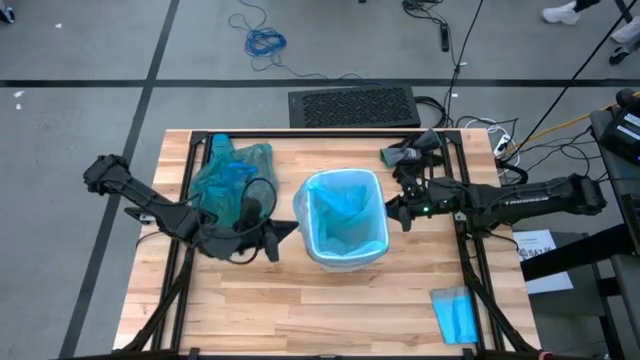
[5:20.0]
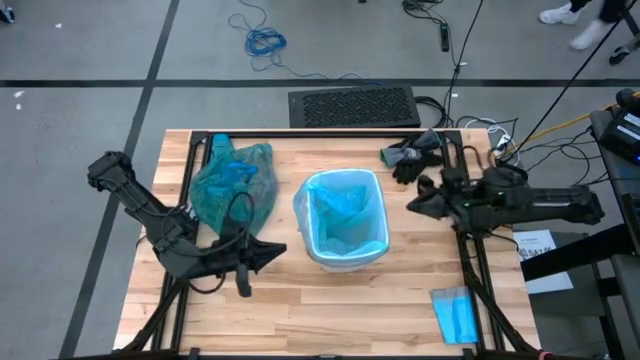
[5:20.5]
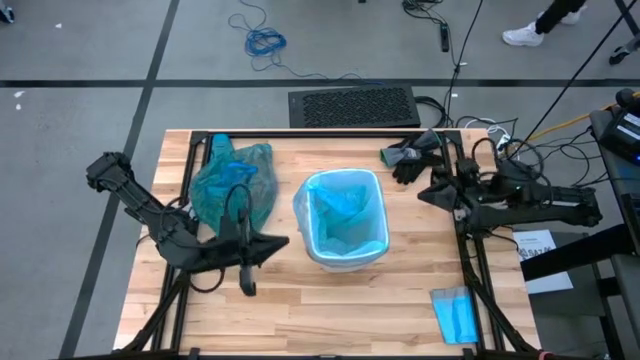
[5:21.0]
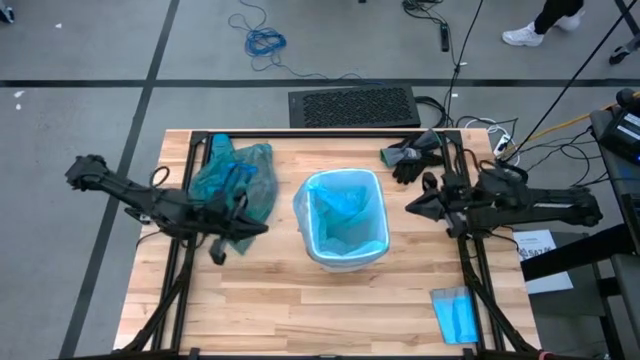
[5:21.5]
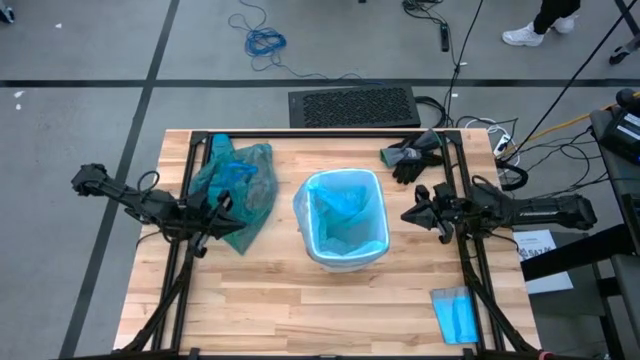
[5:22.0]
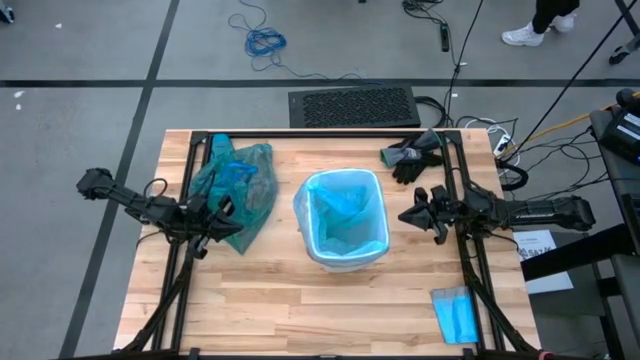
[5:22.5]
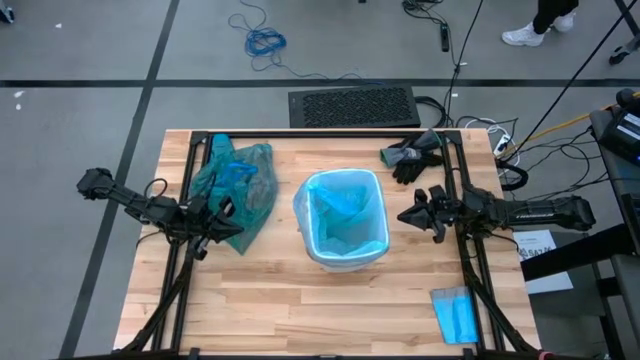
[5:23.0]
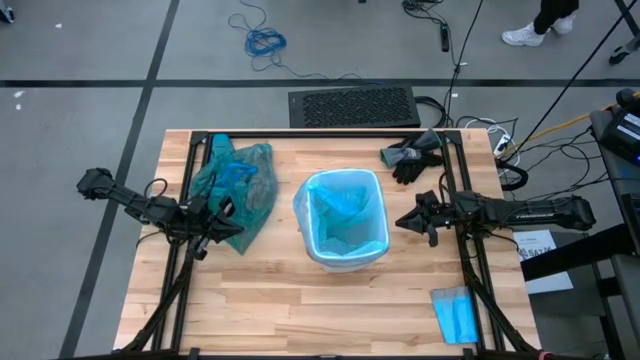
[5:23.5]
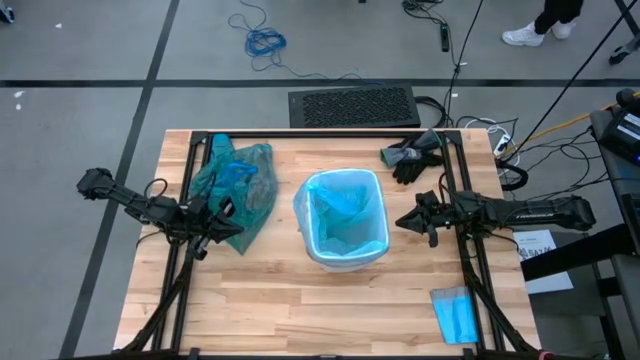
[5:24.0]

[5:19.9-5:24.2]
Task: place trash/remove bag and relplace
Return to Home Position

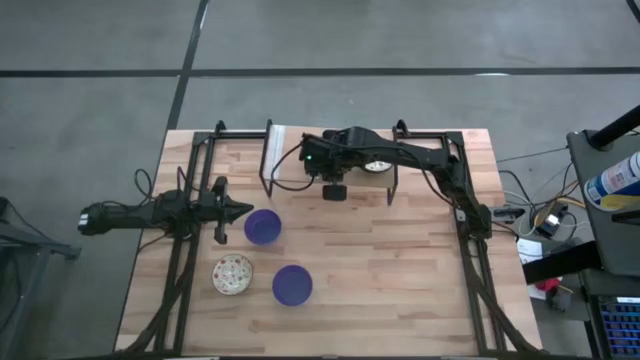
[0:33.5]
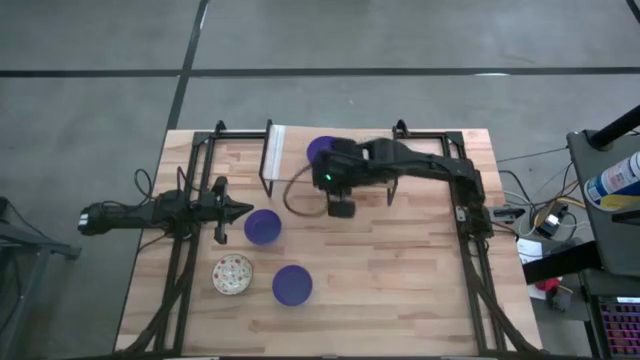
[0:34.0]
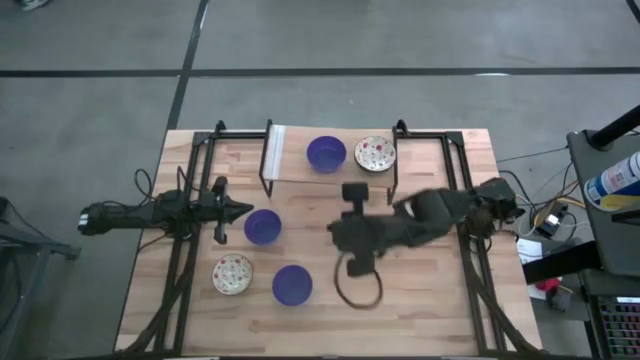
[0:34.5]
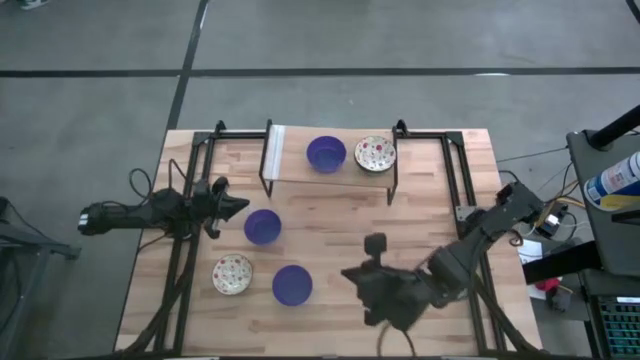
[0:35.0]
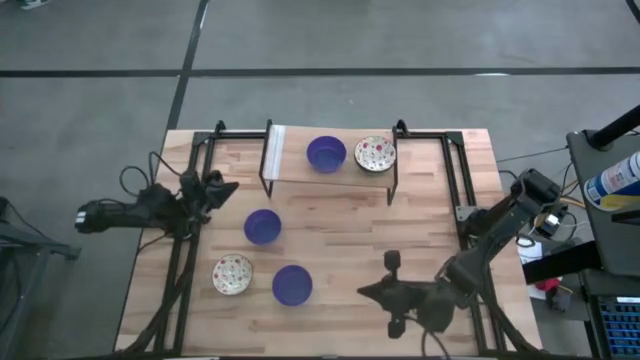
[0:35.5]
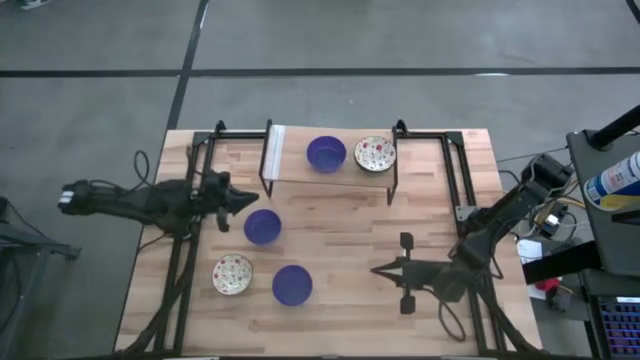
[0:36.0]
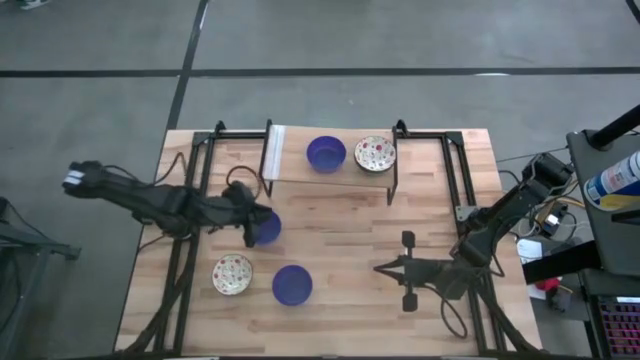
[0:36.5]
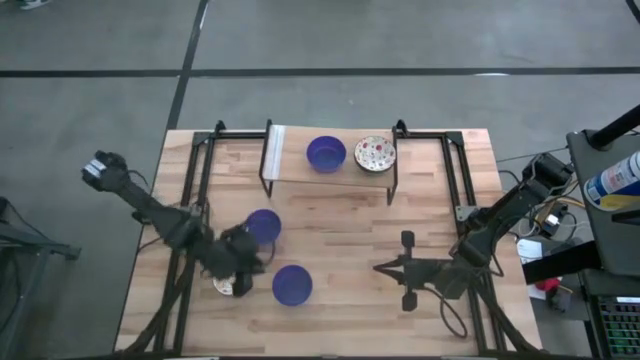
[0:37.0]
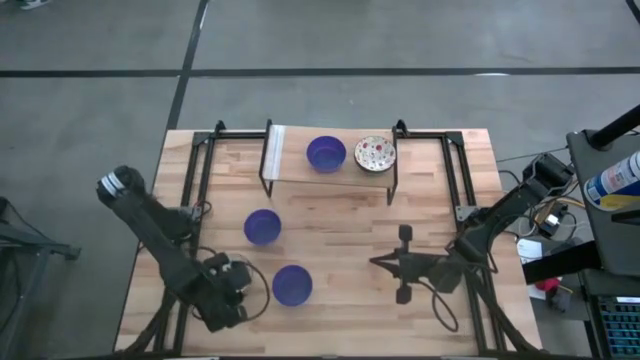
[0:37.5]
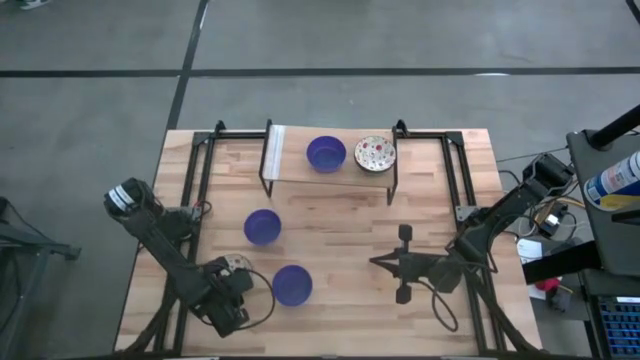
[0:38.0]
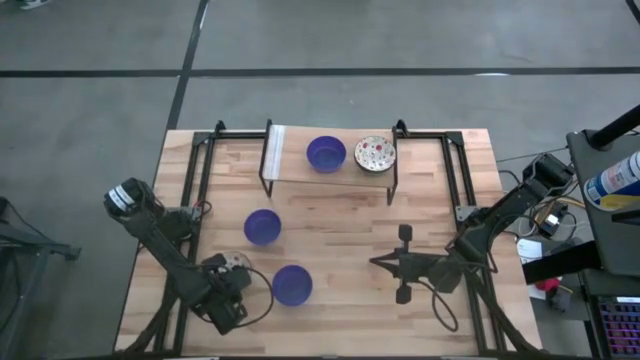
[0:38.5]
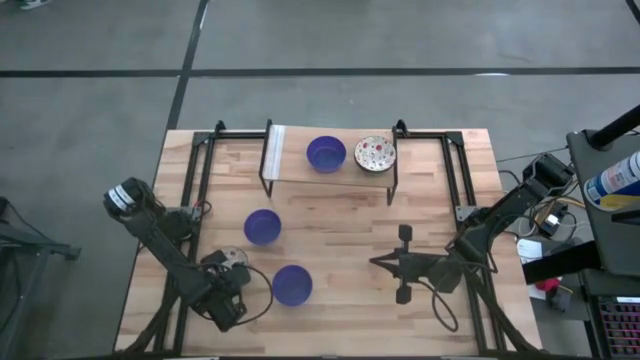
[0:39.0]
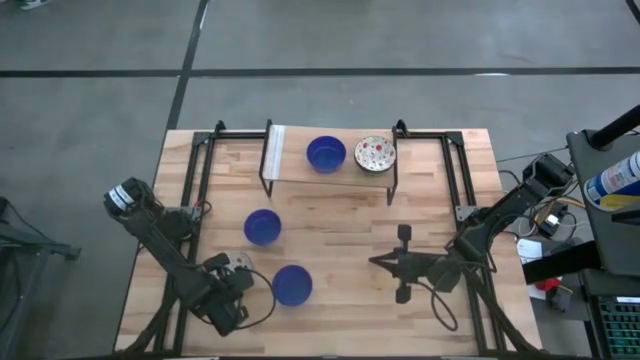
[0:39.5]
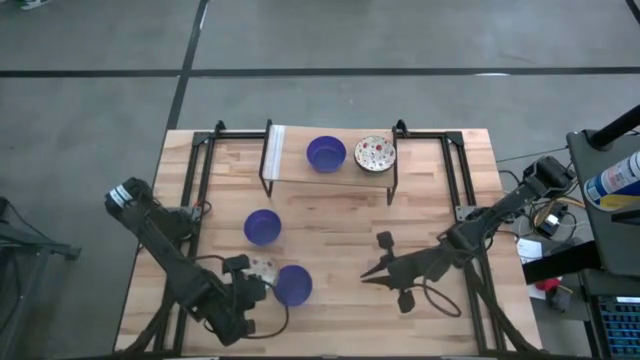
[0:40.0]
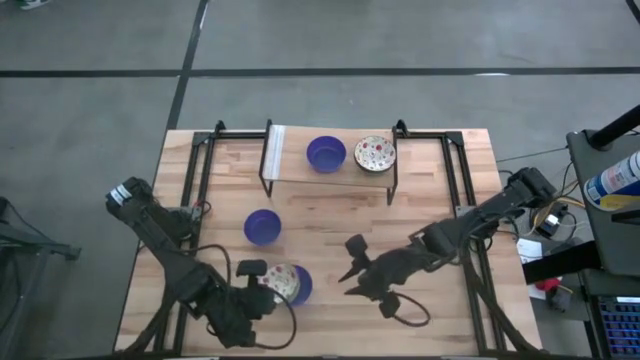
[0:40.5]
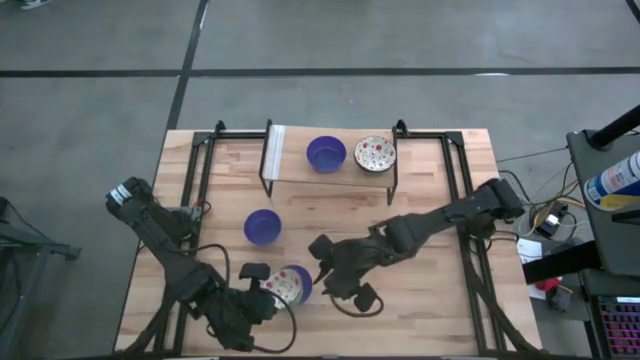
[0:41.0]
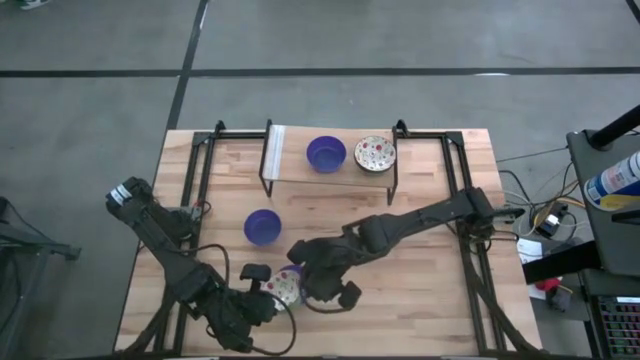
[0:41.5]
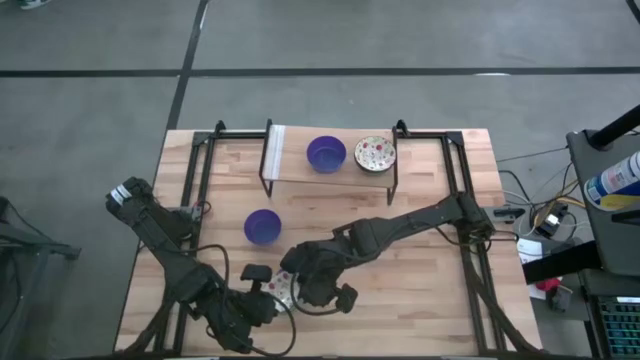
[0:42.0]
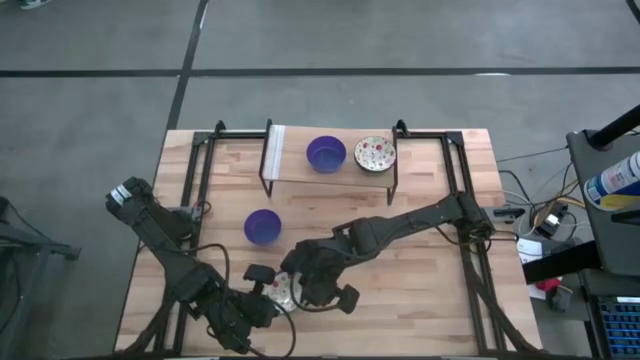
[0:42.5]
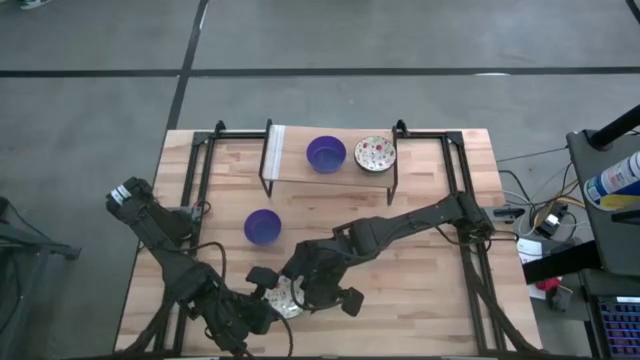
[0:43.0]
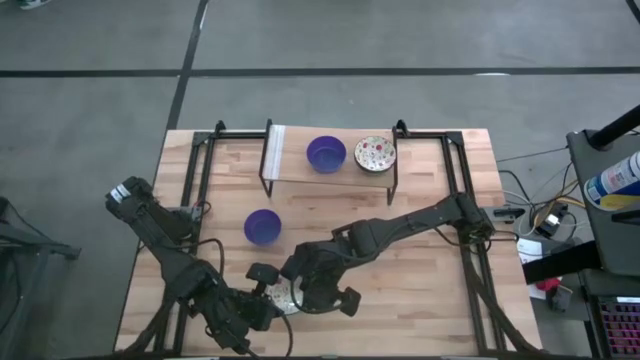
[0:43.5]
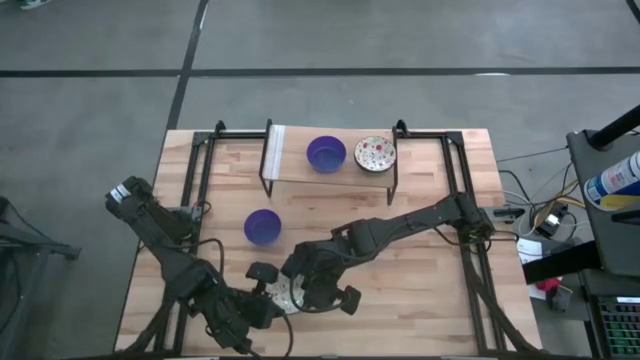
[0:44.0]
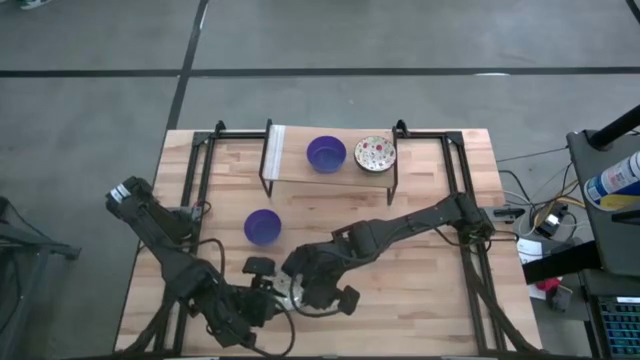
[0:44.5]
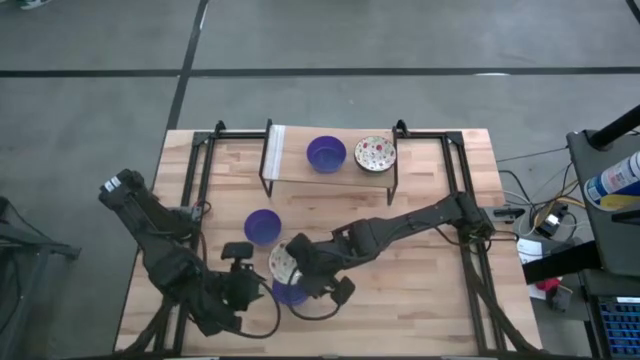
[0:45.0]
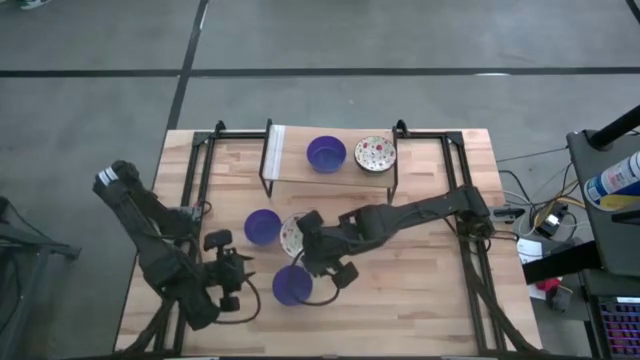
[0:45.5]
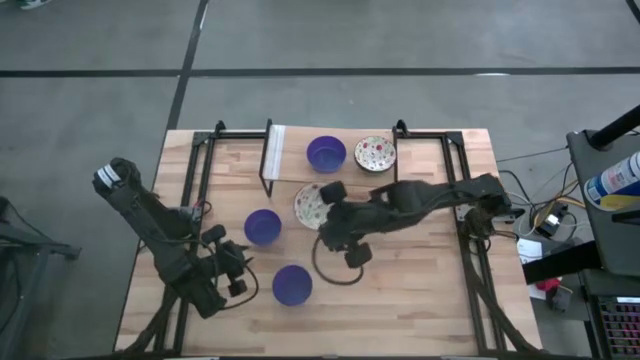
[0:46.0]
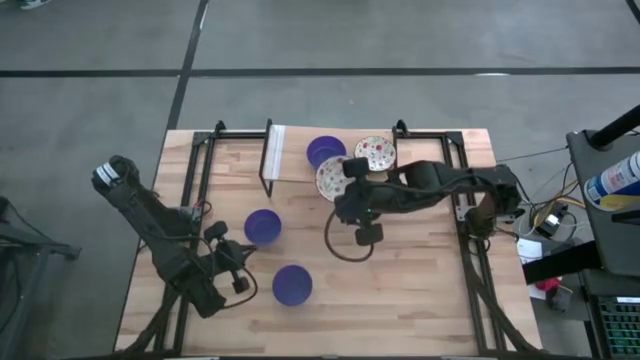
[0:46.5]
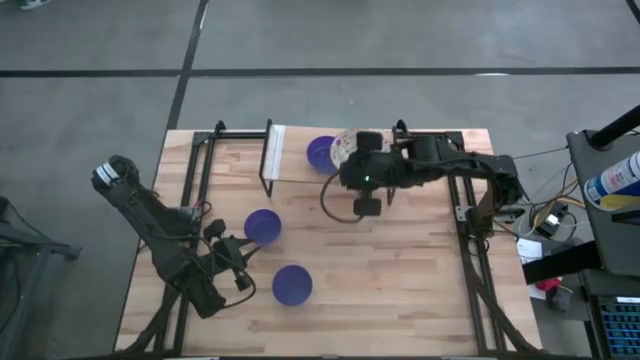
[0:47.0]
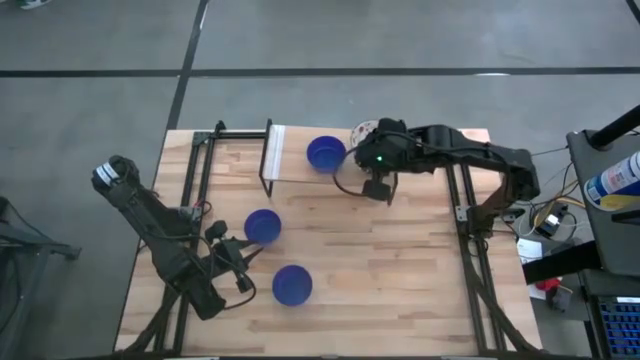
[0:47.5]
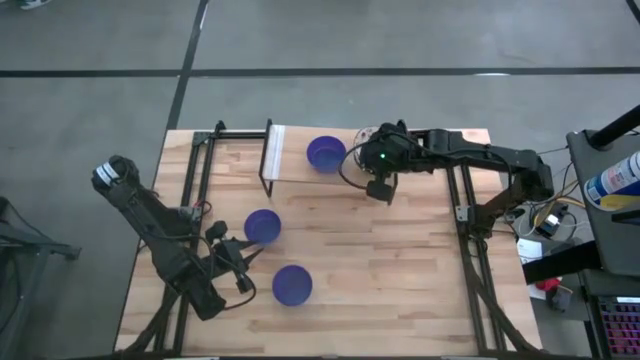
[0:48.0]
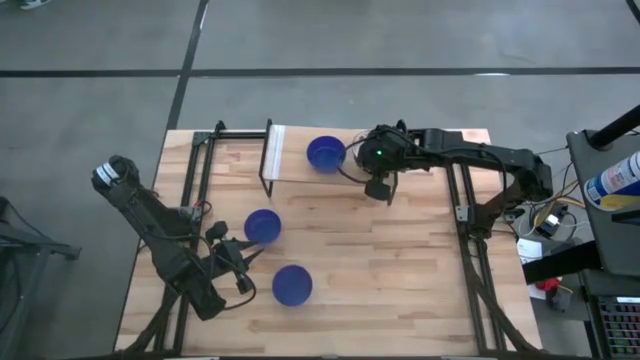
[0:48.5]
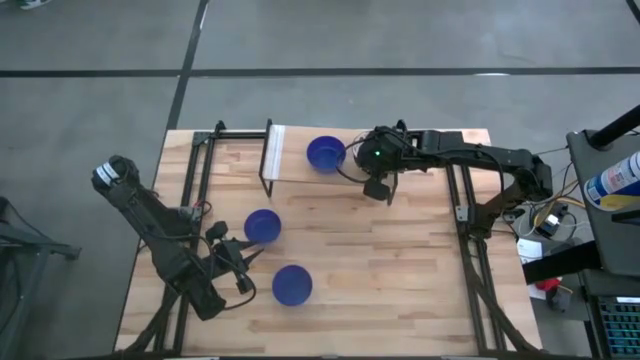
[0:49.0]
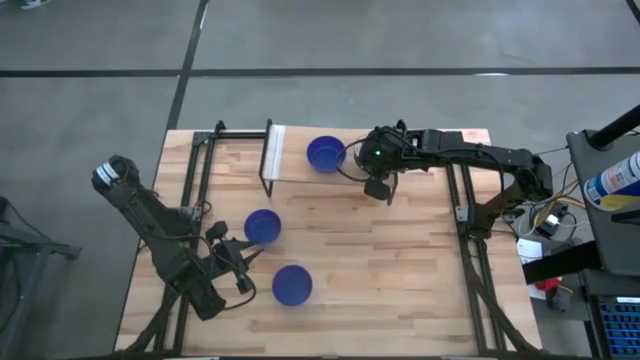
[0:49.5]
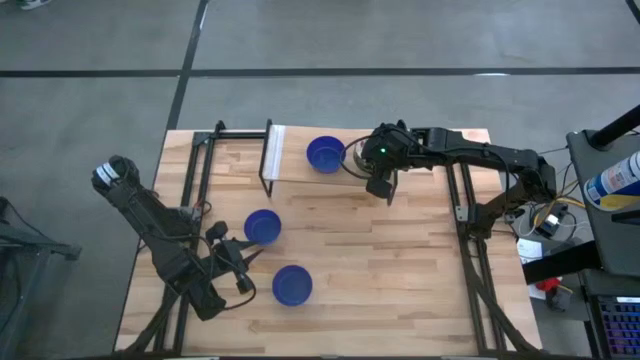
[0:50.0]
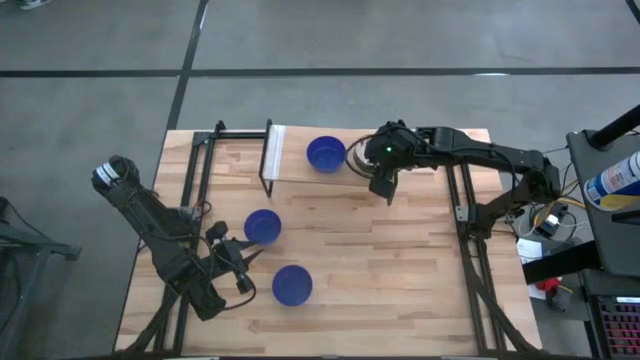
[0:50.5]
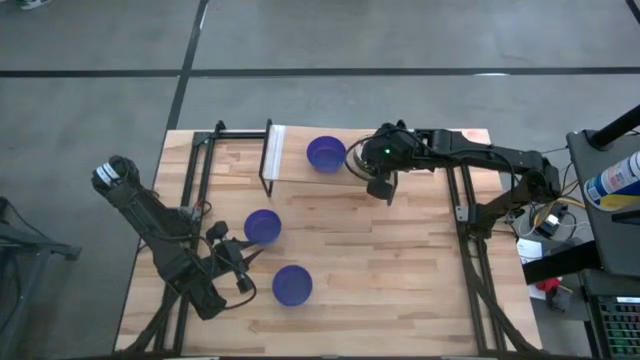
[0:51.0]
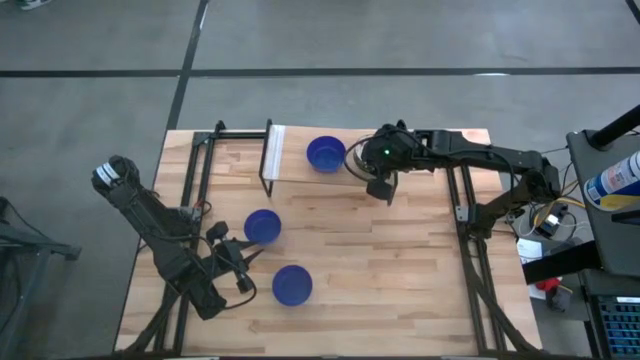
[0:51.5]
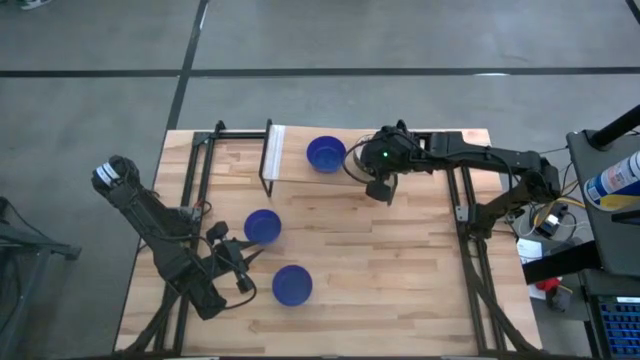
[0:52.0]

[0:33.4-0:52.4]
Task: Pick & Place Mini bowls
Stack the white patterned bowl on top of the stacked white patterned bowls on the shelf
